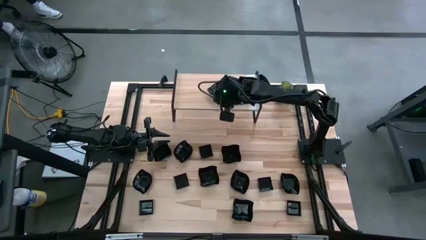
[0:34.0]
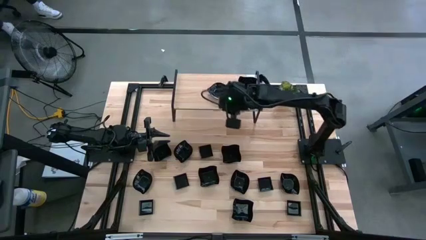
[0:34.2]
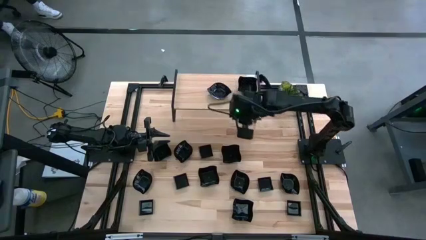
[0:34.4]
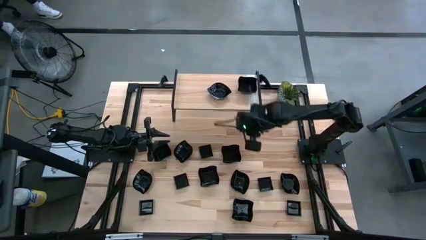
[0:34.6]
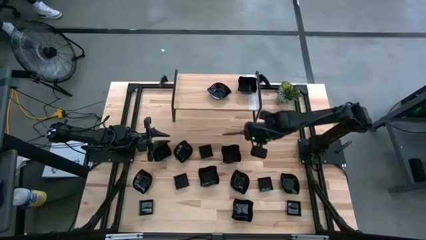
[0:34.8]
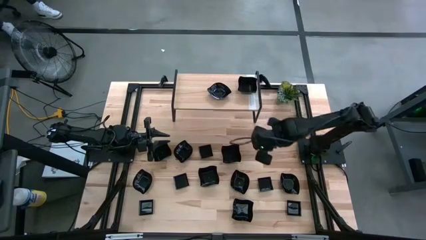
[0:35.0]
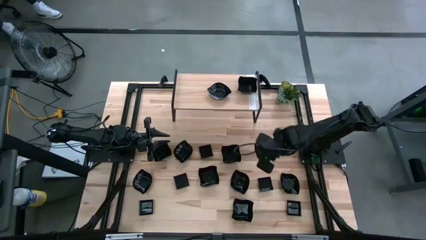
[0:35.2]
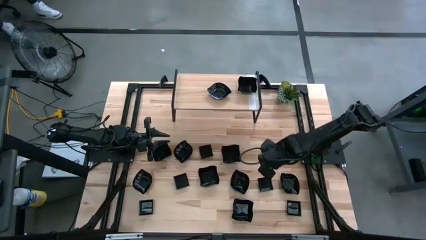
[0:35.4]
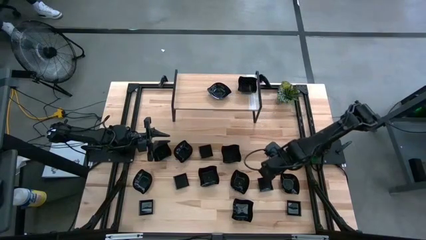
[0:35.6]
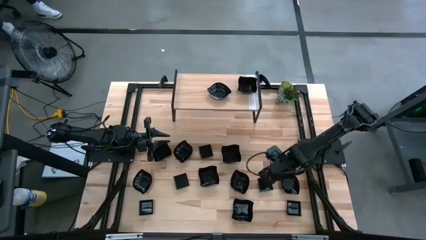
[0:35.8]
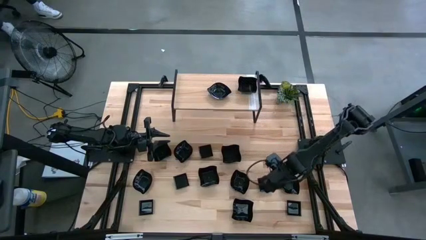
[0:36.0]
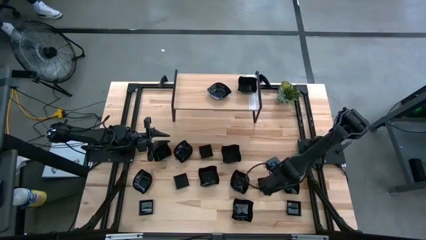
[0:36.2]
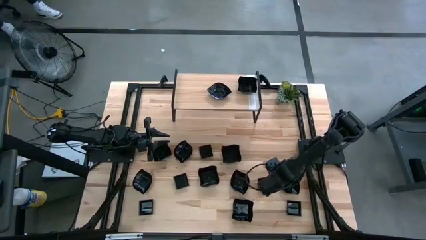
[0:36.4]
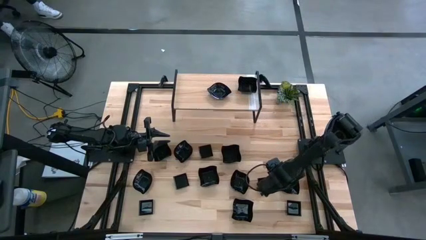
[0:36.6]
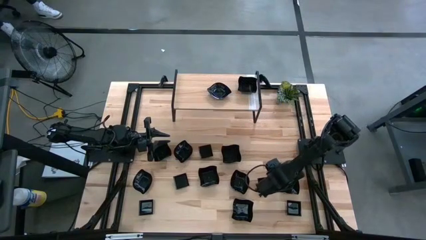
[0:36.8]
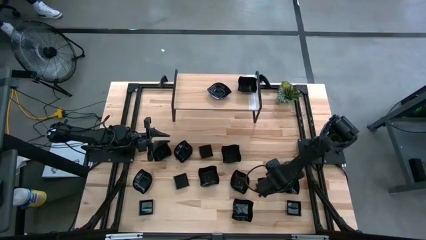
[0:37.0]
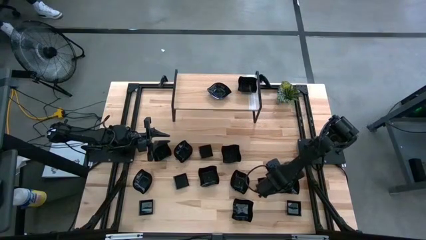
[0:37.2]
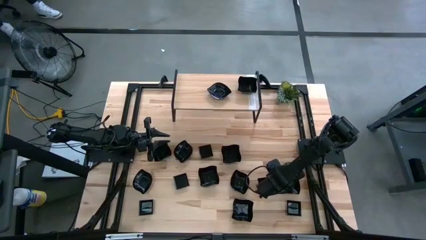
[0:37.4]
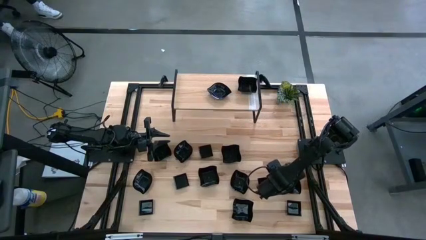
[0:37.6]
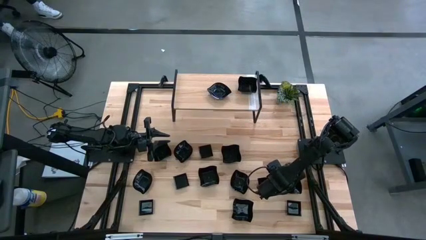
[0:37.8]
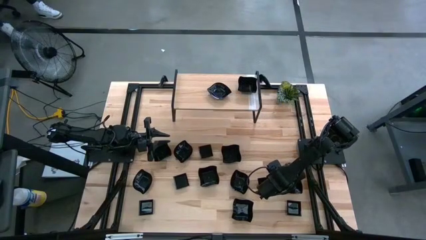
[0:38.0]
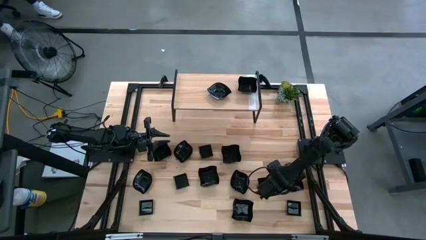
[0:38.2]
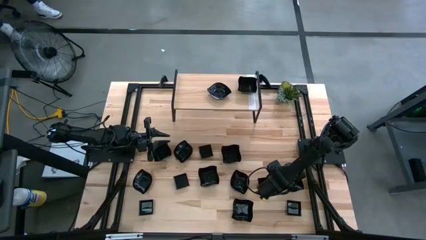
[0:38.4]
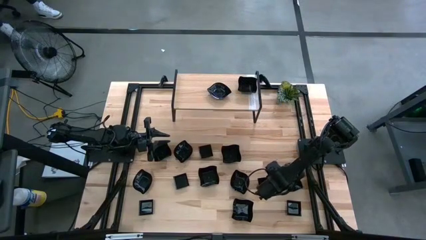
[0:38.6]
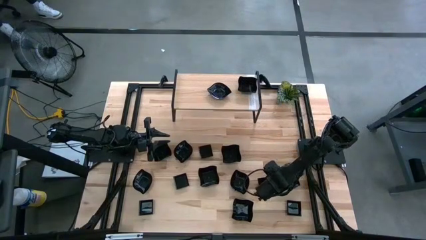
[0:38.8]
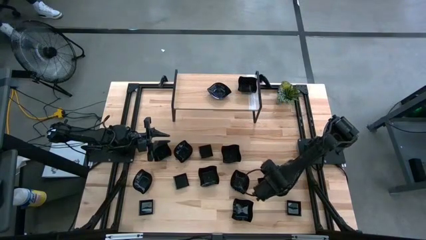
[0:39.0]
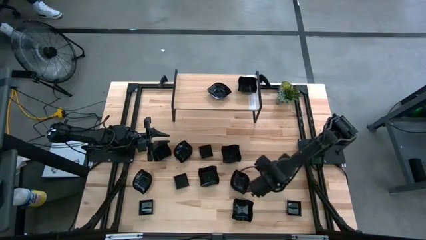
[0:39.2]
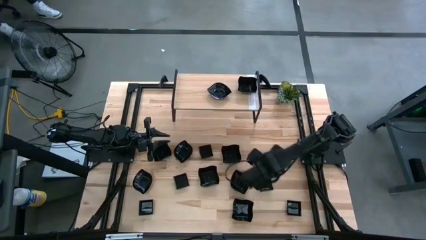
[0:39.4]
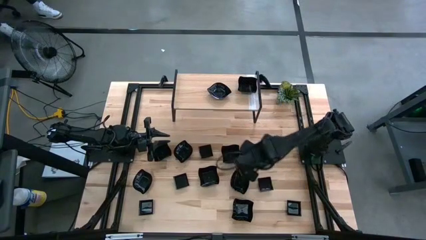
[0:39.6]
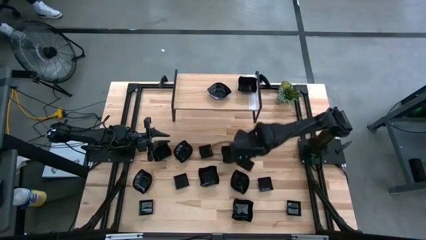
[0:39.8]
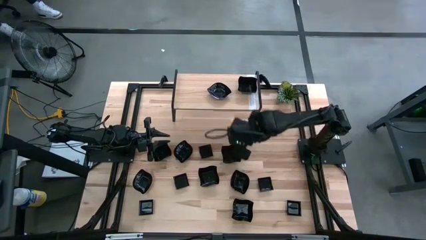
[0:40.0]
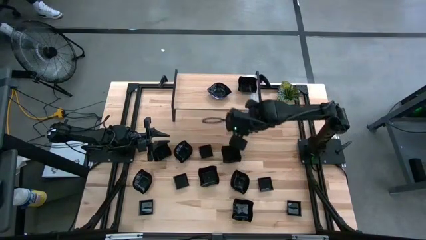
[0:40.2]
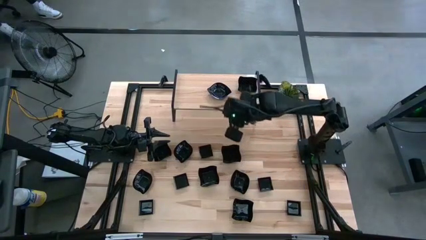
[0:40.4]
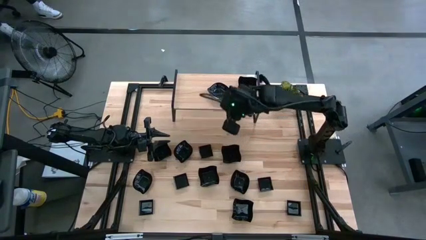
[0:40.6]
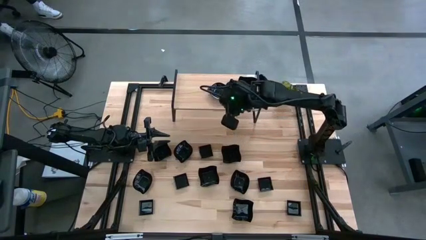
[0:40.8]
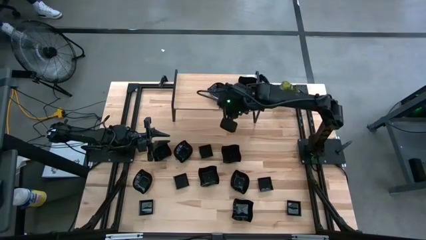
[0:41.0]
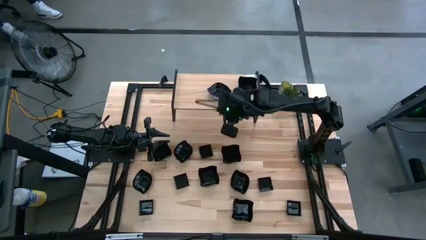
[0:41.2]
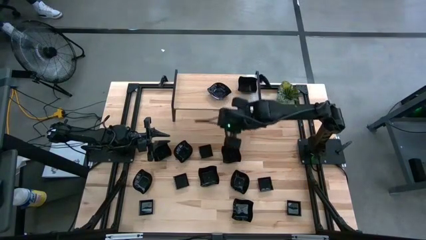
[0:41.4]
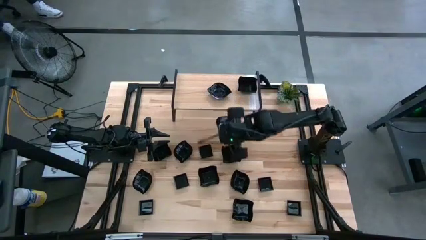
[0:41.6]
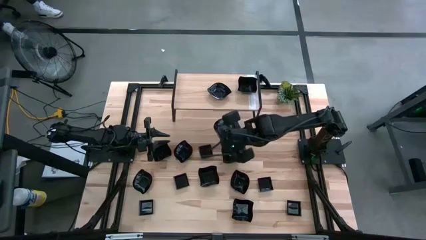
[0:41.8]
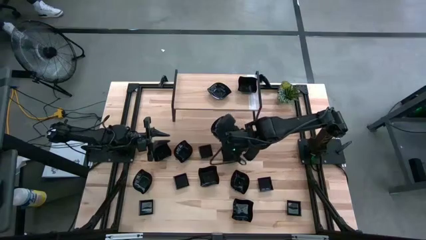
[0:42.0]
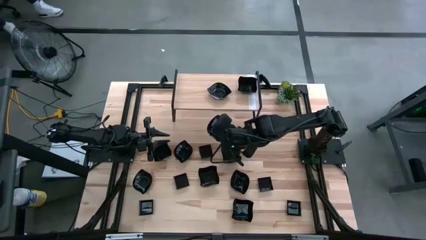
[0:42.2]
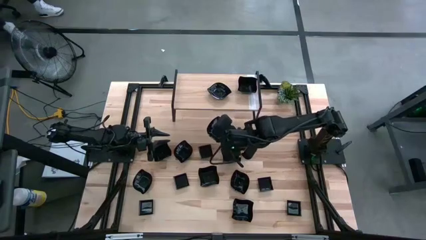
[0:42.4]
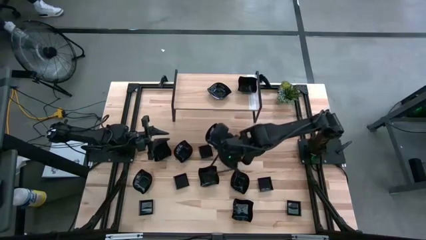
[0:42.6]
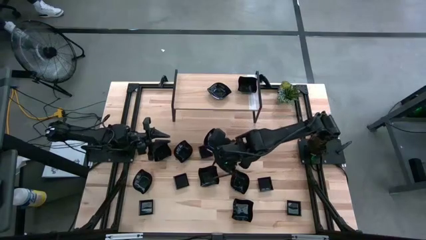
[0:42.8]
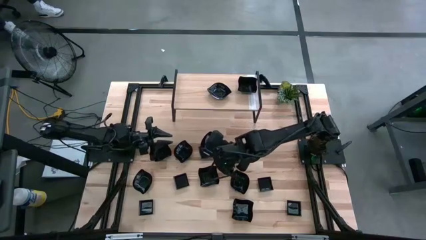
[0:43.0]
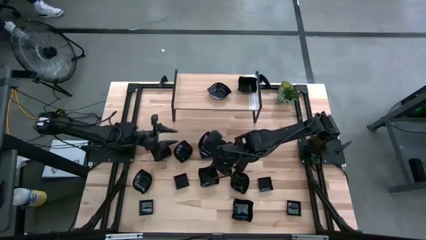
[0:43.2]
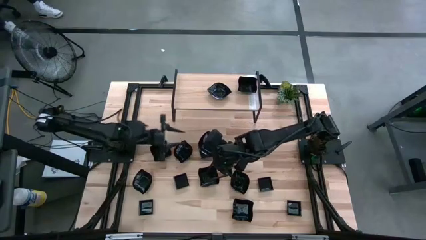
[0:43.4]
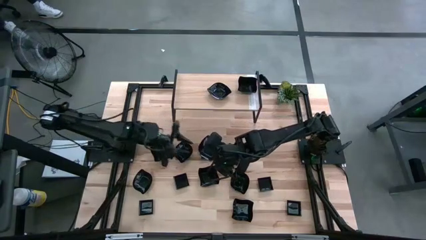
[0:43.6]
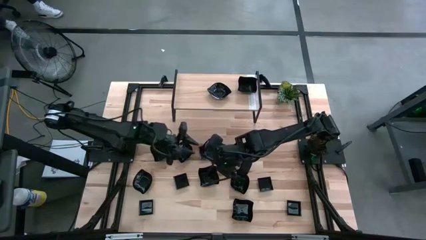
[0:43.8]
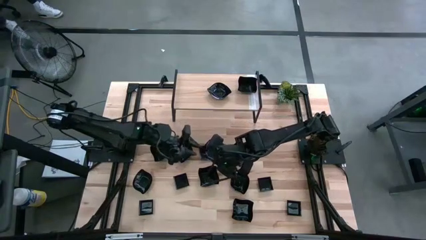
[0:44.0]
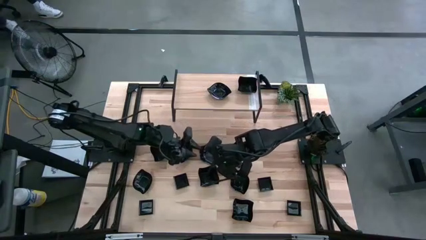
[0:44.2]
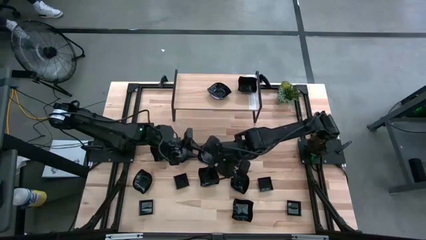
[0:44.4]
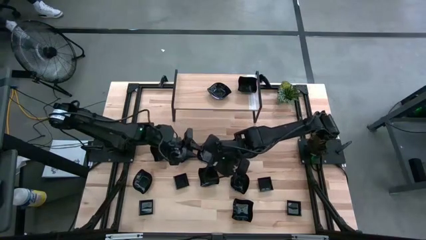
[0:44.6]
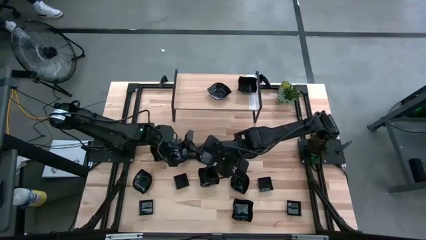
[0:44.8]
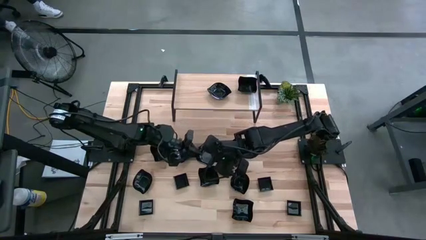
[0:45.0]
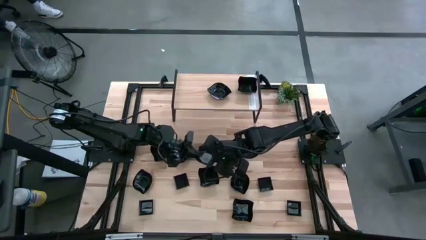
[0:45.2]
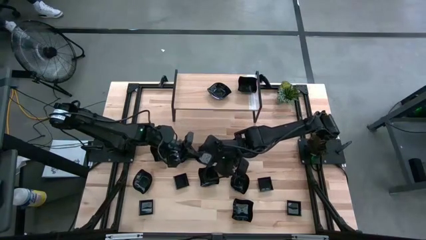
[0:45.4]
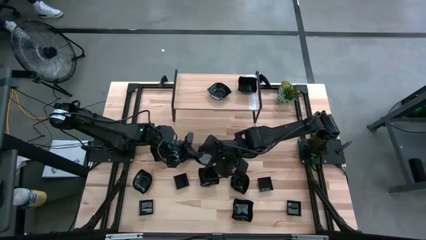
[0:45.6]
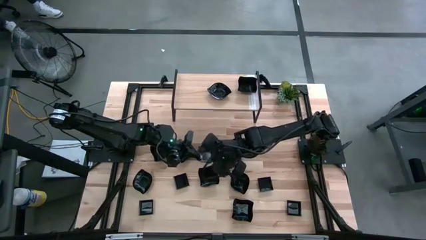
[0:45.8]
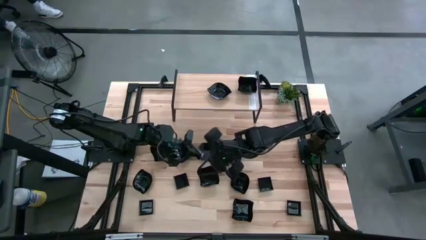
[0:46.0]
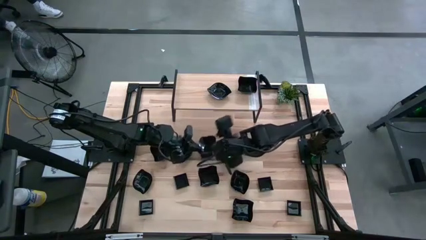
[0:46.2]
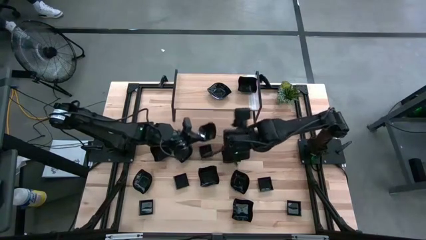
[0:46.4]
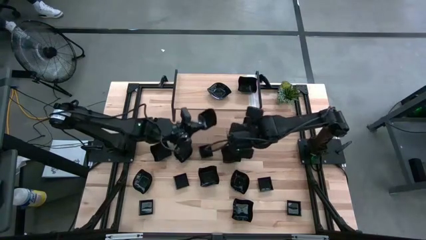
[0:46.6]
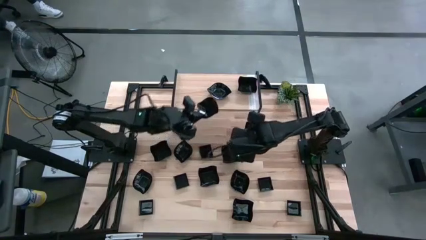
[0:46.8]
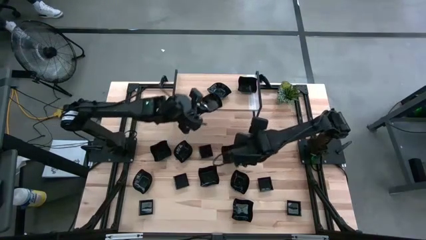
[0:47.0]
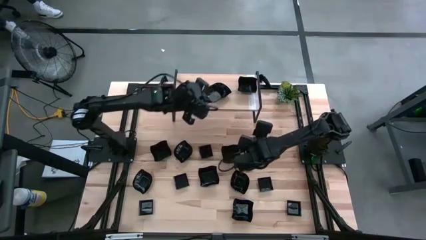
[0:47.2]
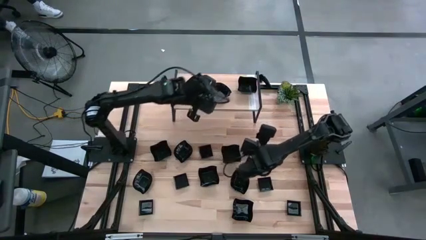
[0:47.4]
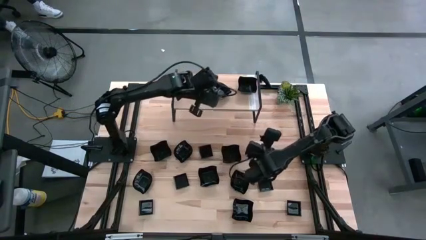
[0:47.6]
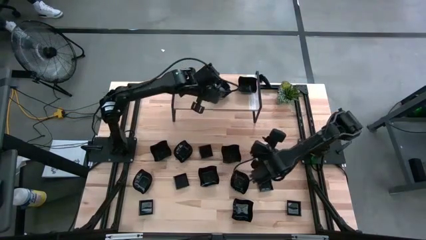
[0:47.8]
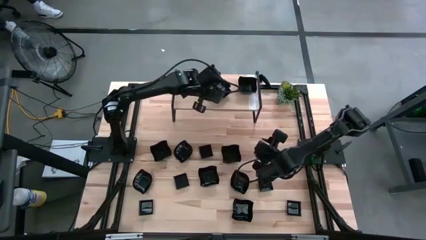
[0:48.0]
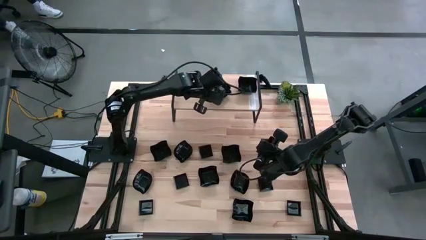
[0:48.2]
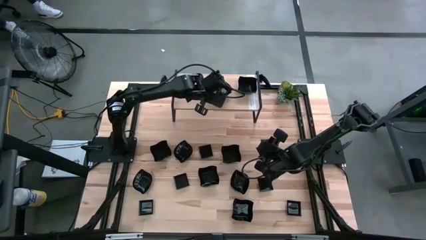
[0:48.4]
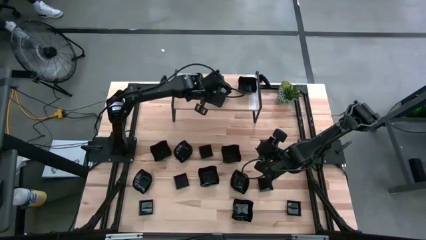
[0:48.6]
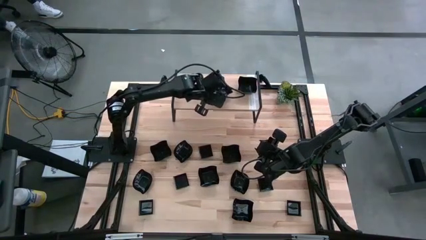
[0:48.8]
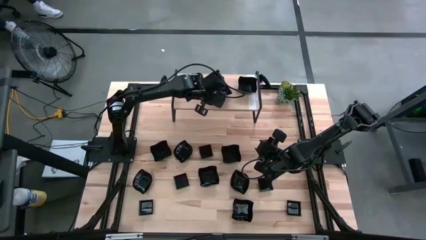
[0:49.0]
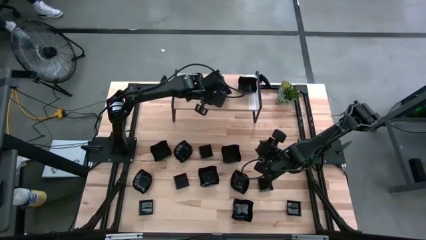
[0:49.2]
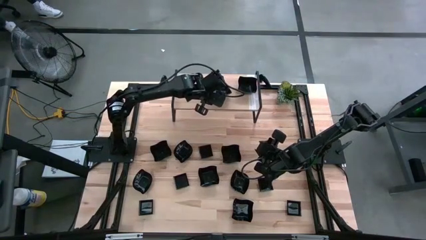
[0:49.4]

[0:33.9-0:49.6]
Task: Pick & Place Mini shaped plates
Stack the leaf-shaped plate on top of the other leaf-shaped plate on the shelf
